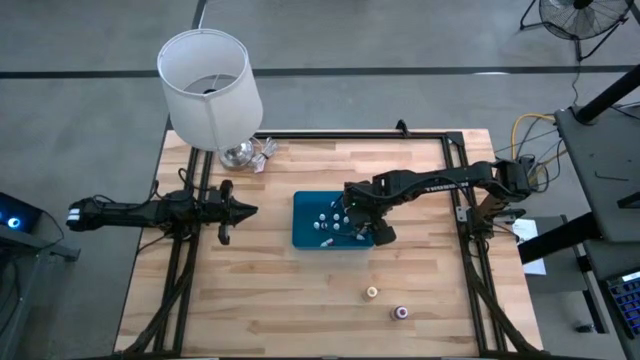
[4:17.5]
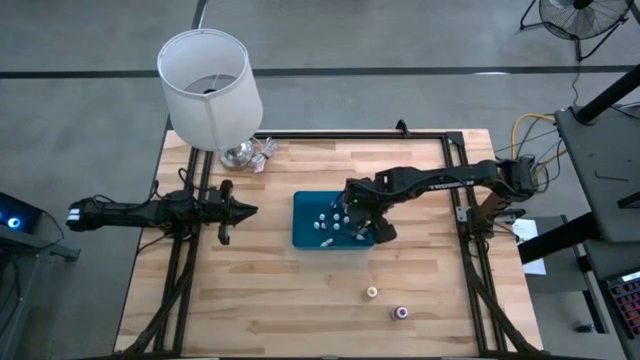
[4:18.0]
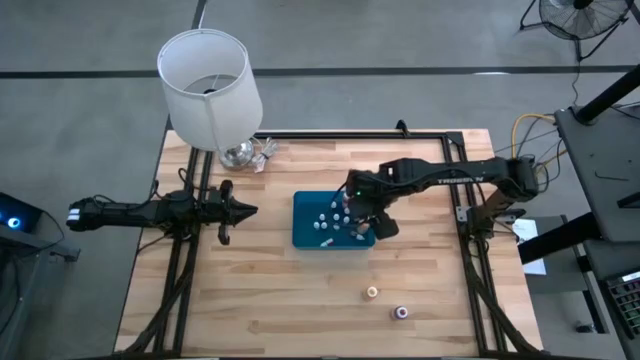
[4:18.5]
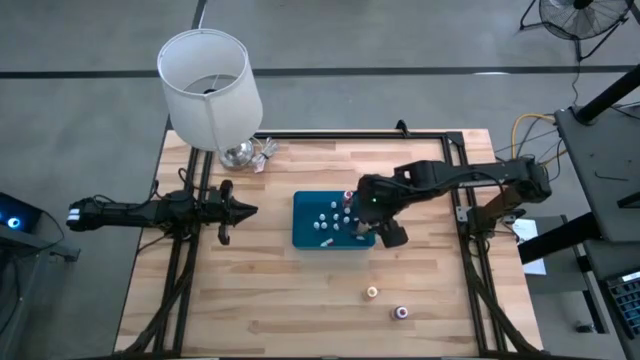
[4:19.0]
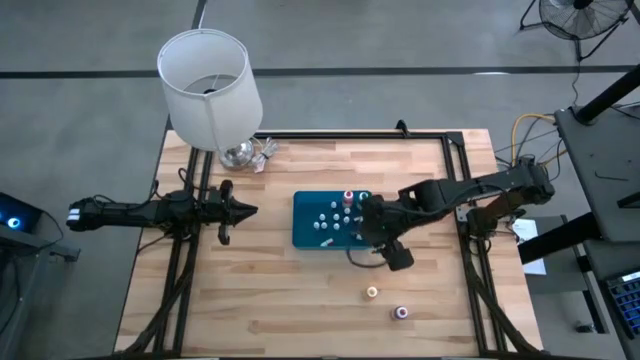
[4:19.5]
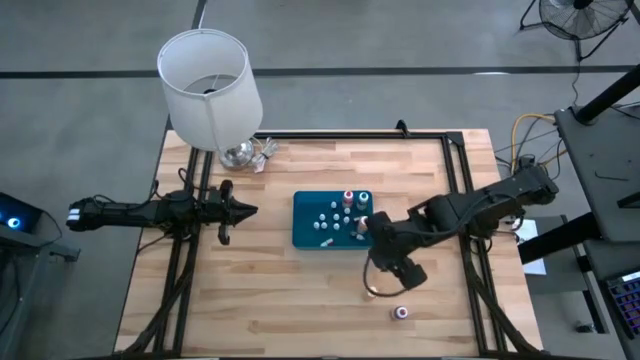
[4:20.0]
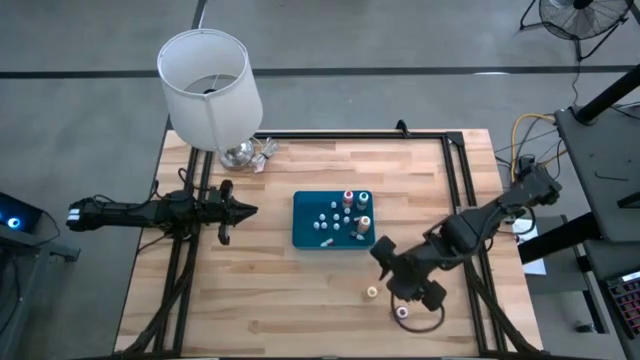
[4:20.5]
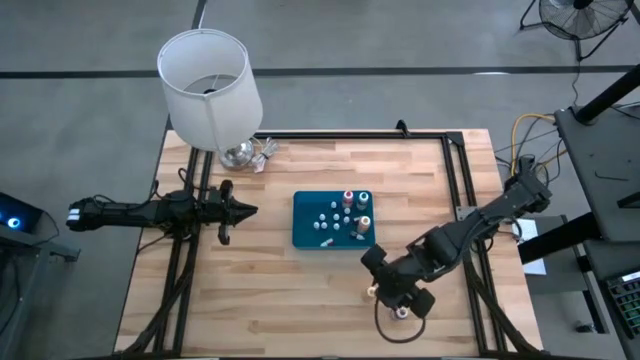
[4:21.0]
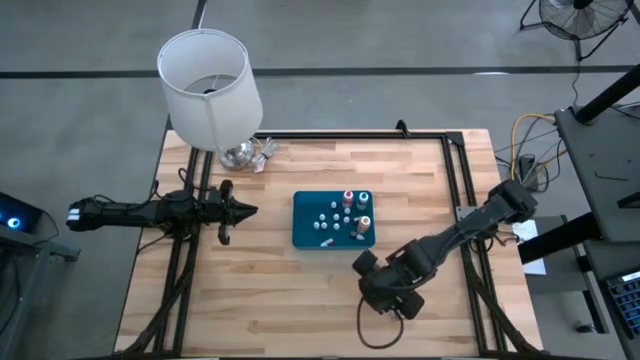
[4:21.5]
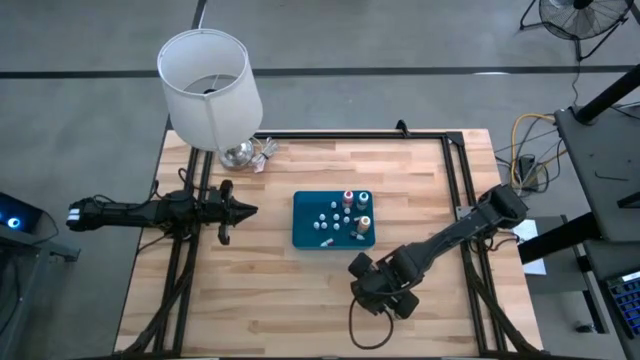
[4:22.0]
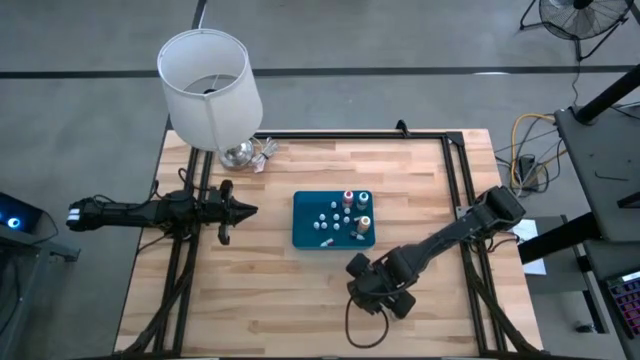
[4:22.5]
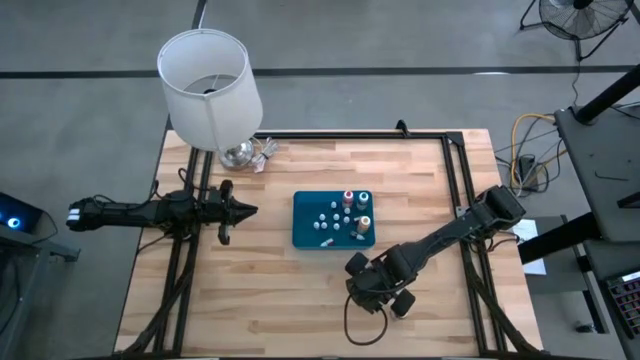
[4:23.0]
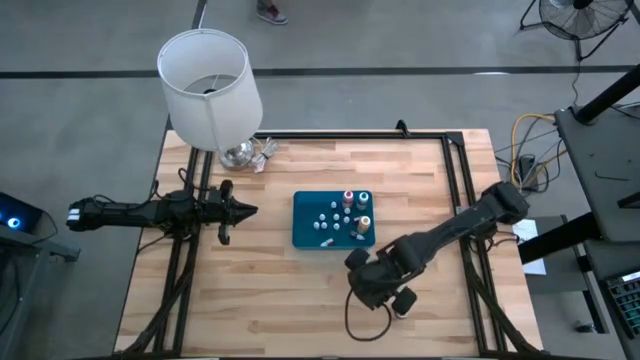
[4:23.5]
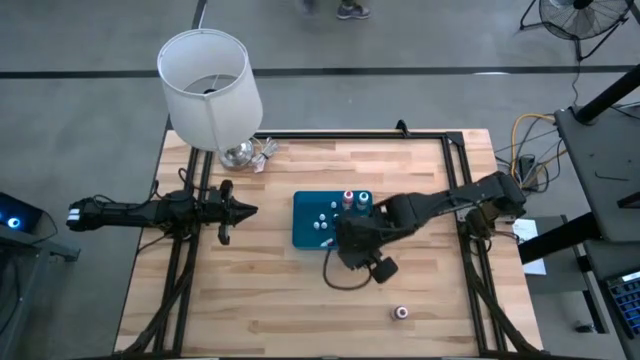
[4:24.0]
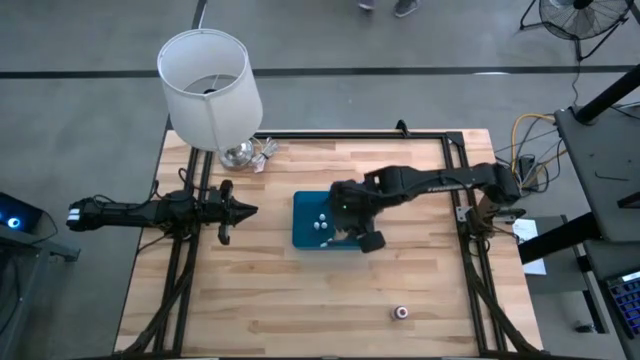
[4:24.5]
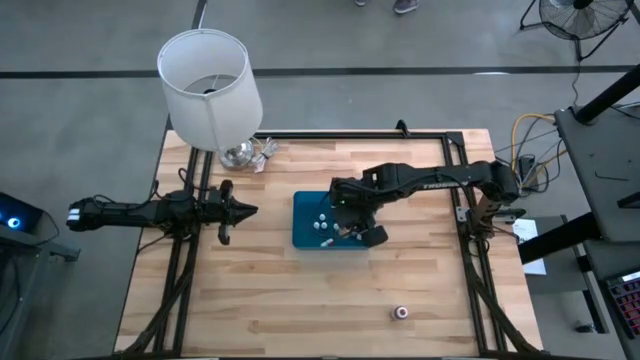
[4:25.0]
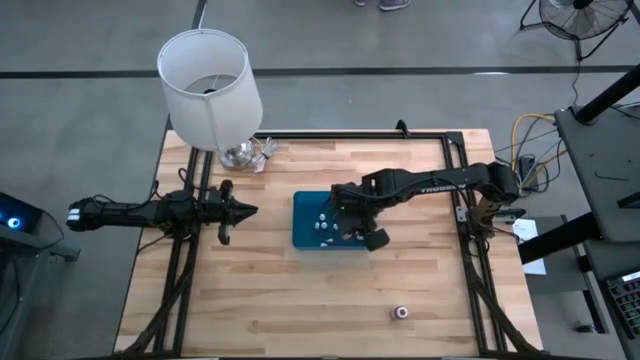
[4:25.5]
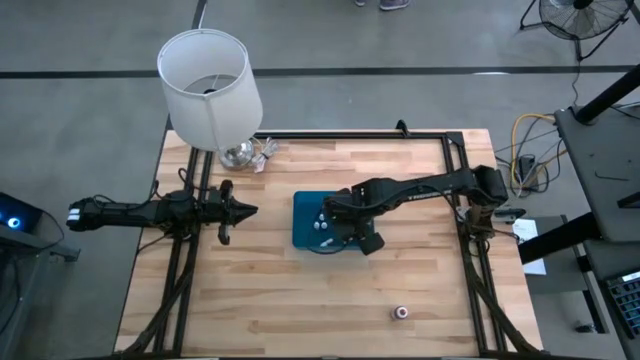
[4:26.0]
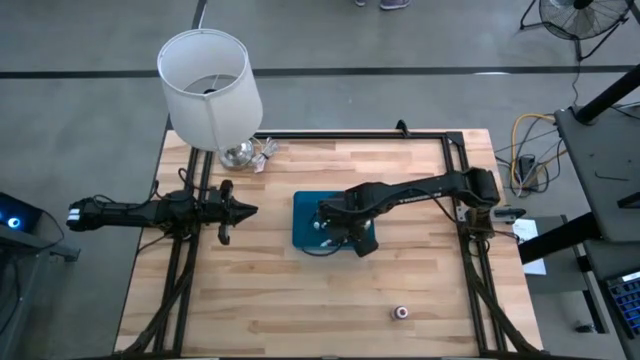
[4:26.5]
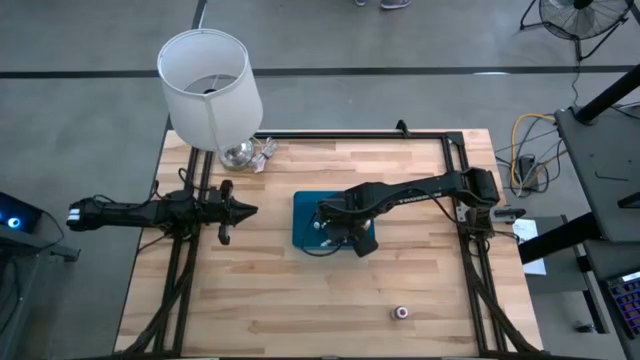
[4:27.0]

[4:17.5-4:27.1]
Task: Pick & Place food coloring
Put the large yellow food coloring bottle into the blue bin

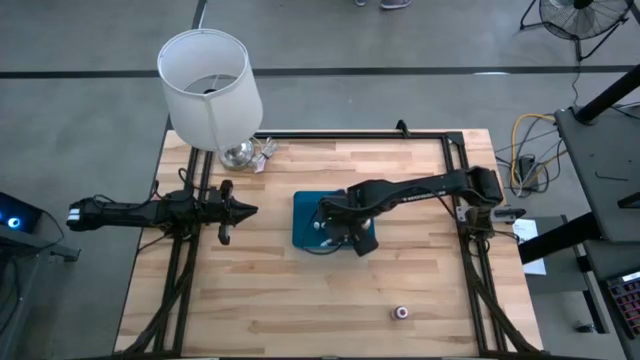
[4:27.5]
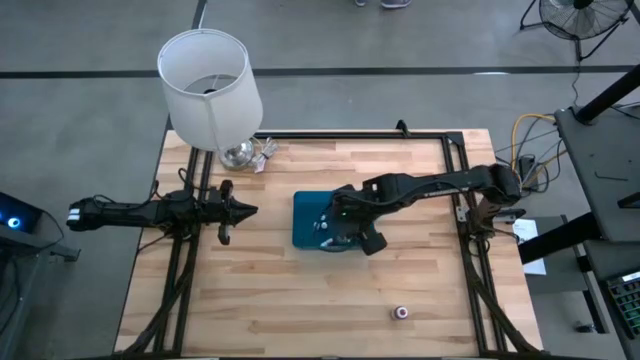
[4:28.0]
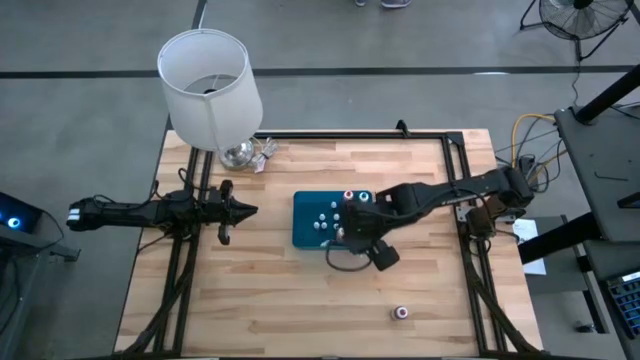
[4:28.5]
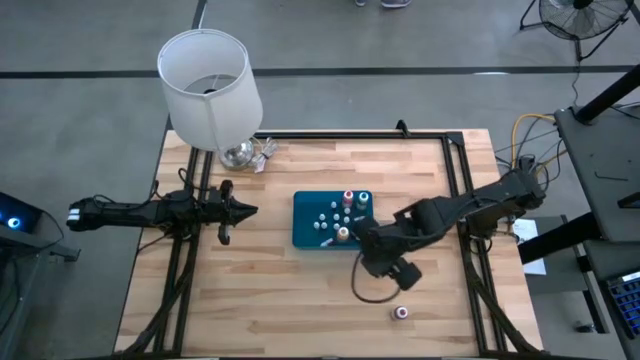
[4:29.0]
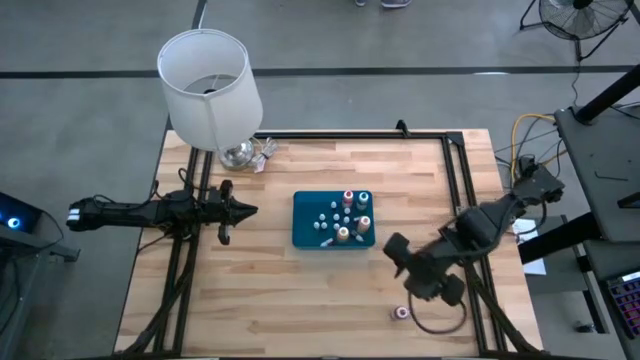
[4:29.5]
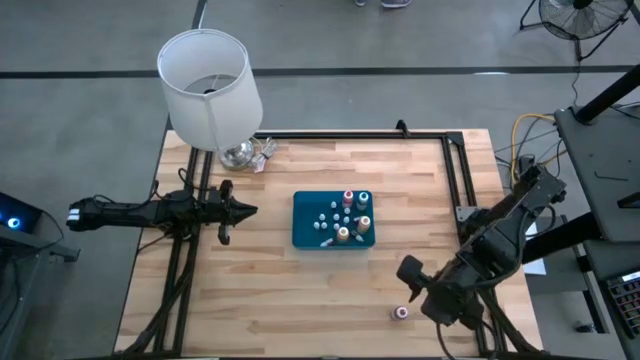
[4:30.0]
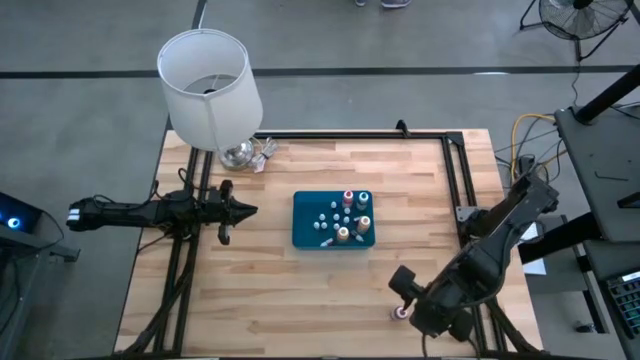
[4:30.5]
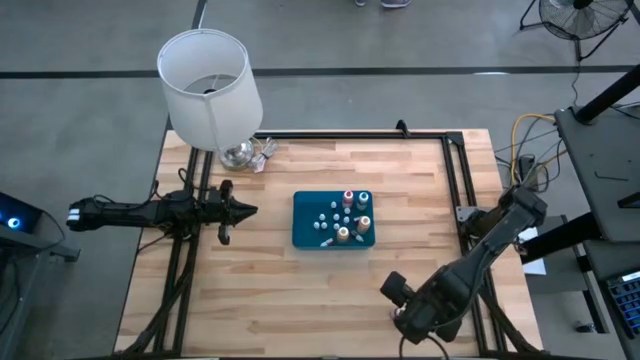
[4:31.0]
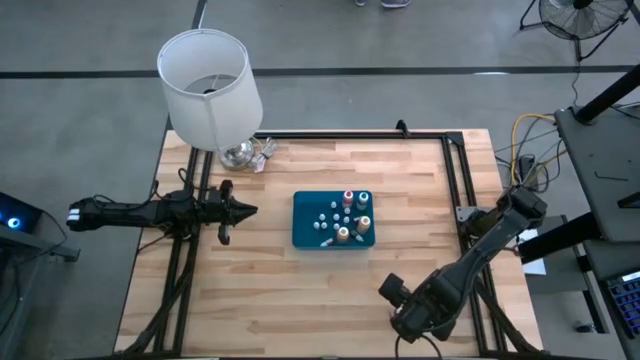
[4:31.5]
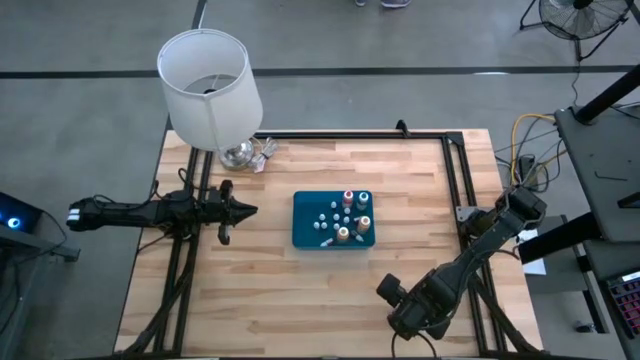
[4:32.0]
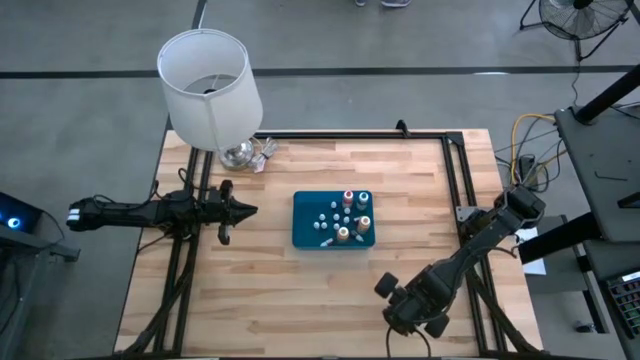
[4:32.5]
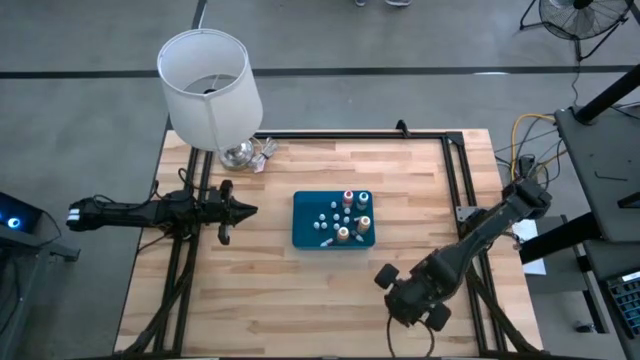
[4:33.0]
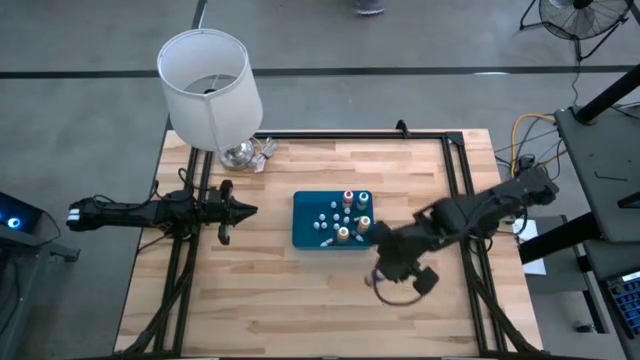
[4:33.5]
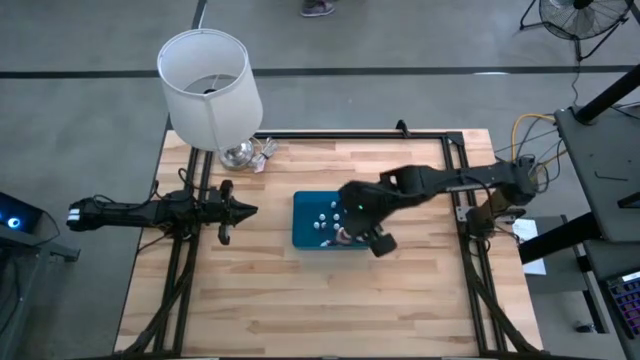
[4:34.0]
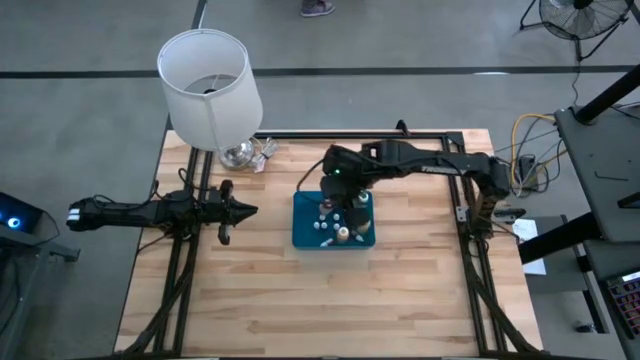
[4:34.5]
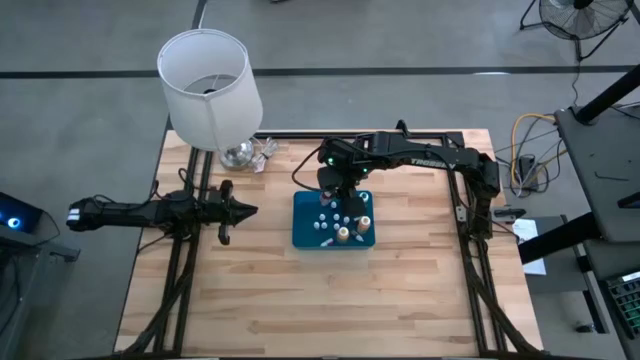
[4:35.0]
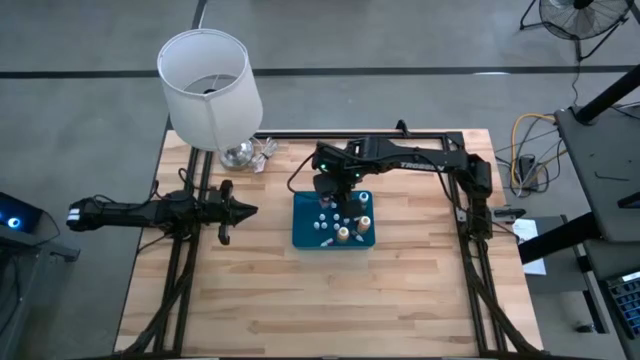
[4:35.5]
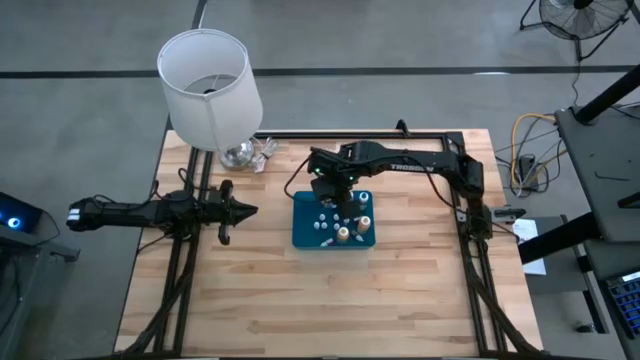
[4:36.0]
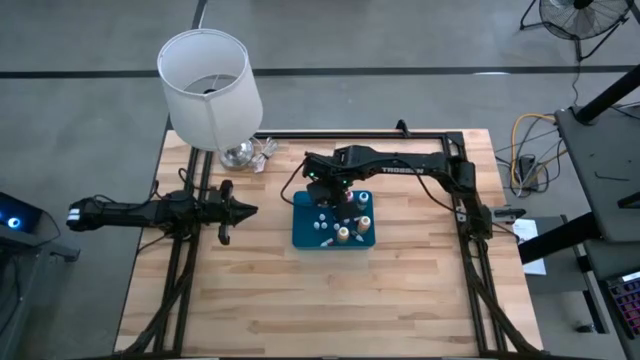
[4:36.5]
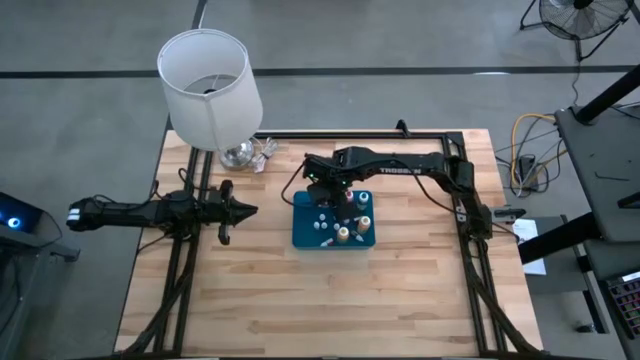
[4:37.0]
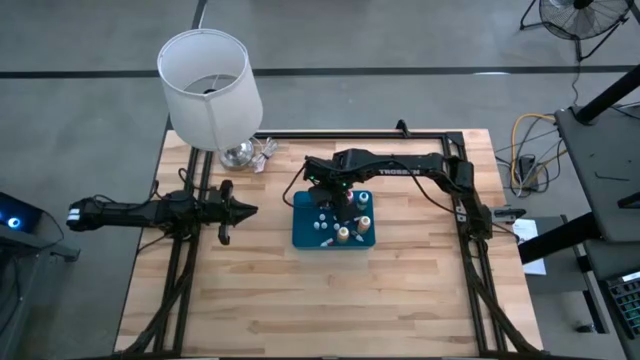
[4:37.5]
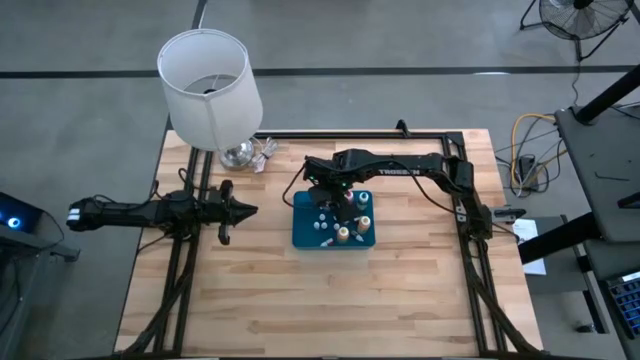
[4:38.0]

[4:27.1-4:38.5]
Put the large red food coloring bottle into the blue bin
